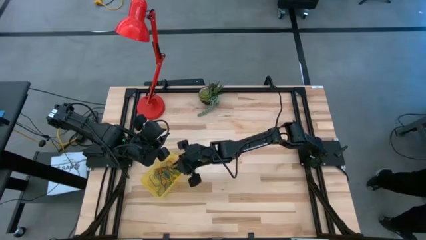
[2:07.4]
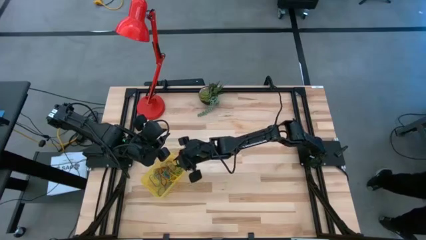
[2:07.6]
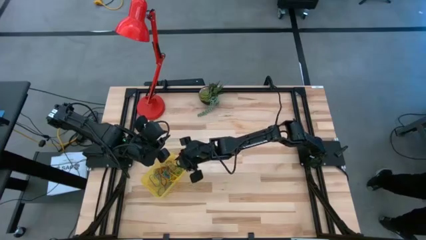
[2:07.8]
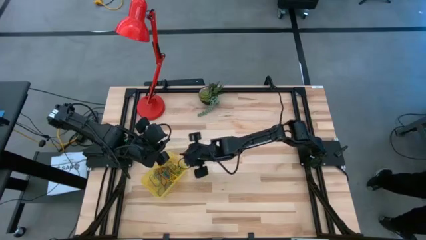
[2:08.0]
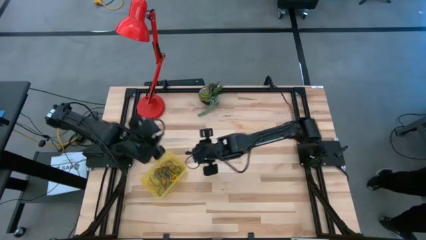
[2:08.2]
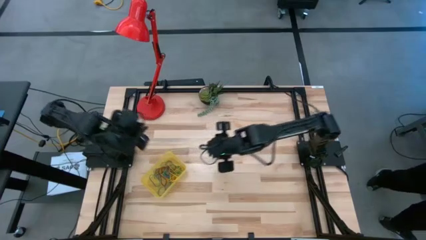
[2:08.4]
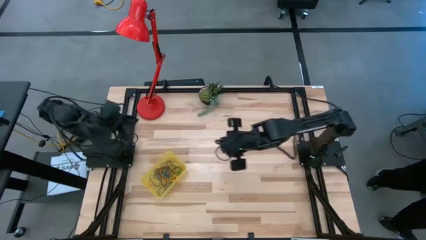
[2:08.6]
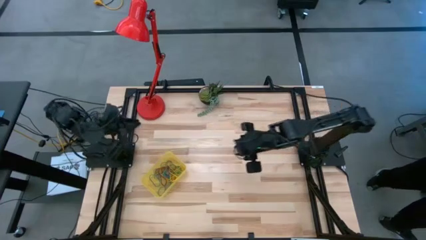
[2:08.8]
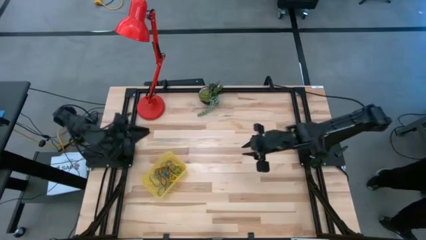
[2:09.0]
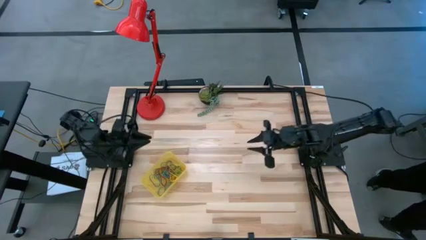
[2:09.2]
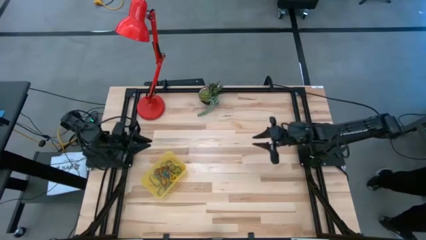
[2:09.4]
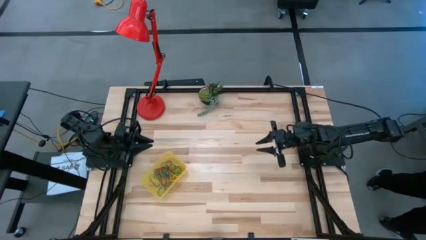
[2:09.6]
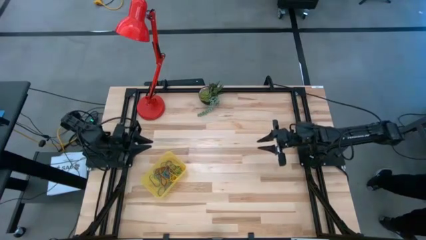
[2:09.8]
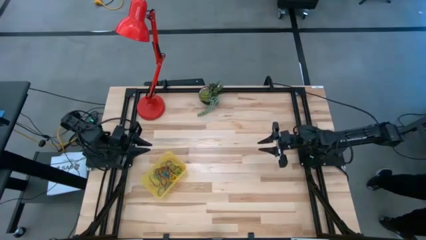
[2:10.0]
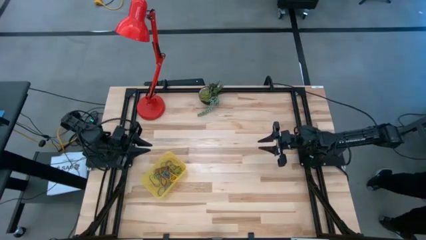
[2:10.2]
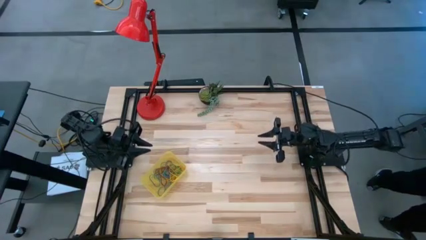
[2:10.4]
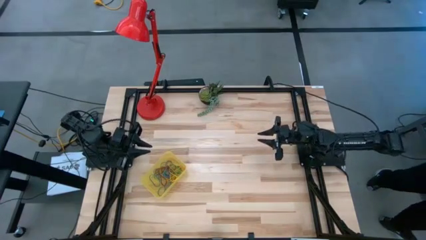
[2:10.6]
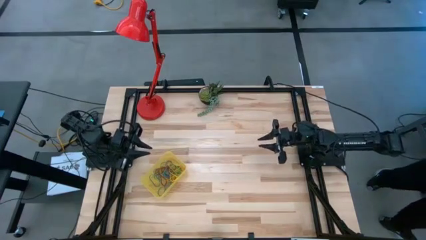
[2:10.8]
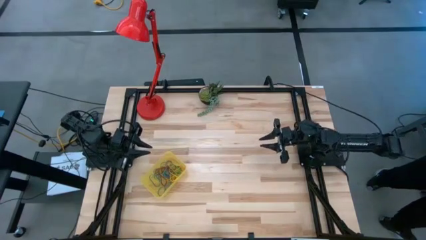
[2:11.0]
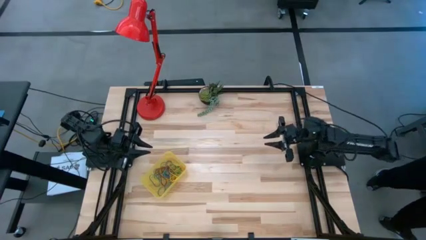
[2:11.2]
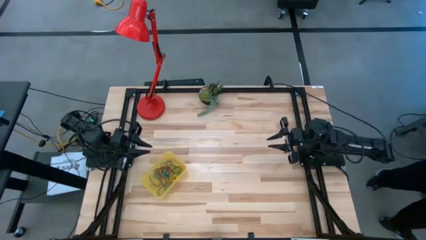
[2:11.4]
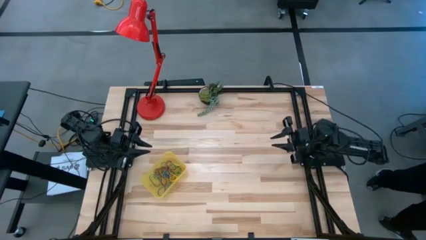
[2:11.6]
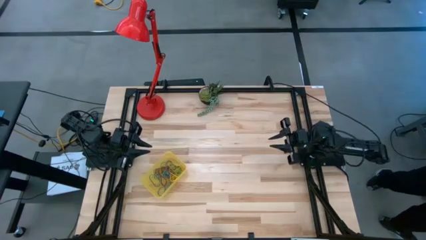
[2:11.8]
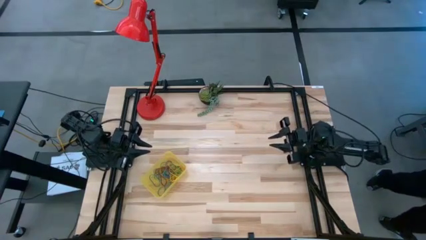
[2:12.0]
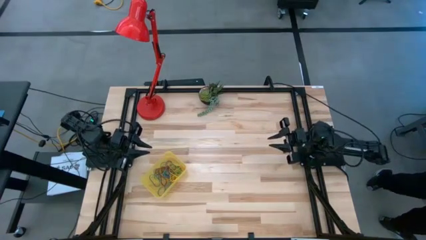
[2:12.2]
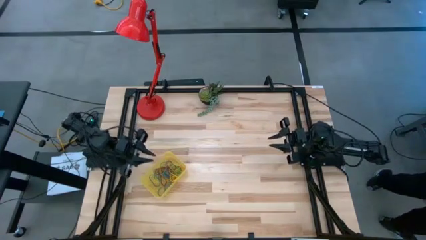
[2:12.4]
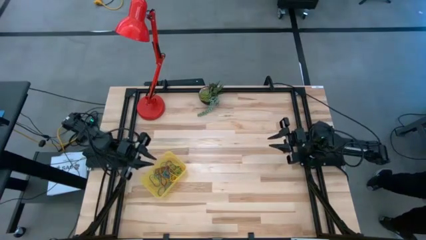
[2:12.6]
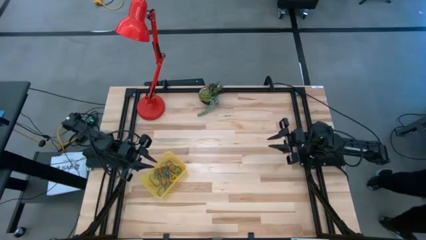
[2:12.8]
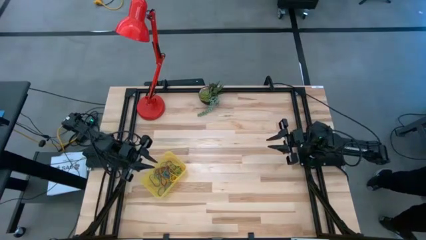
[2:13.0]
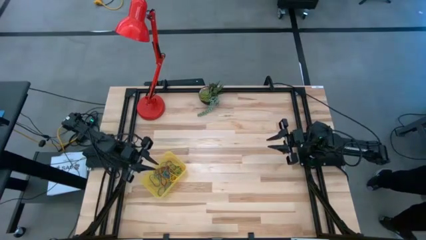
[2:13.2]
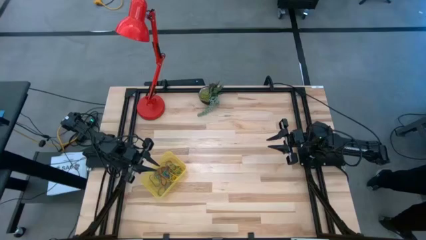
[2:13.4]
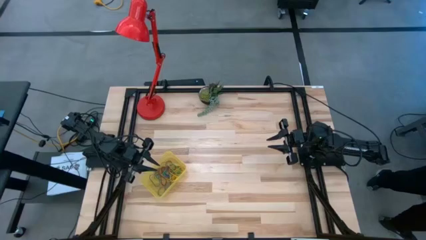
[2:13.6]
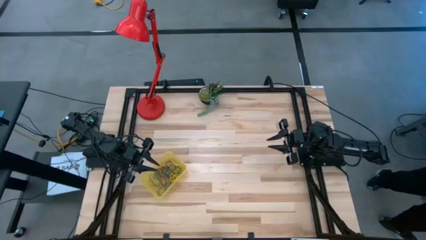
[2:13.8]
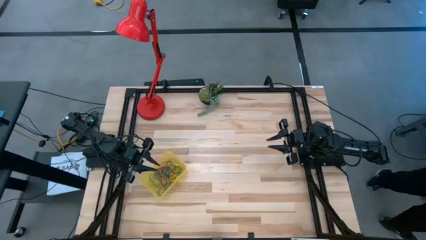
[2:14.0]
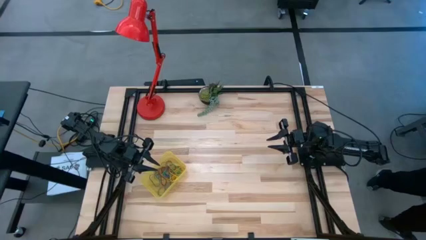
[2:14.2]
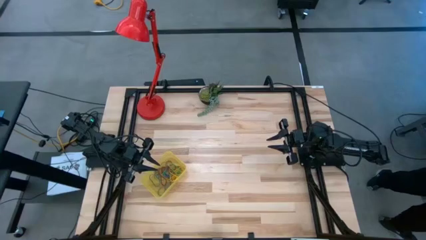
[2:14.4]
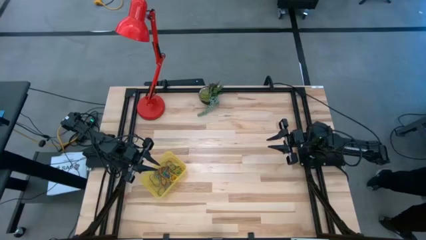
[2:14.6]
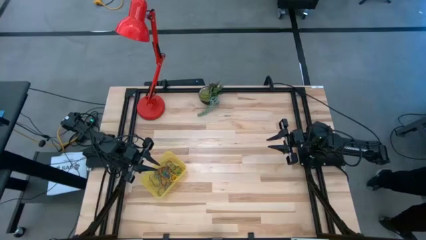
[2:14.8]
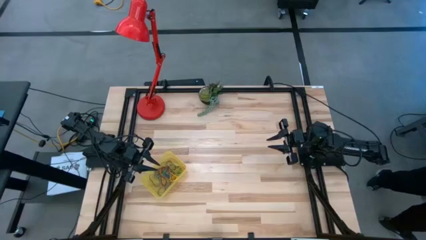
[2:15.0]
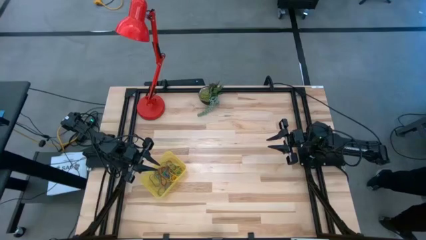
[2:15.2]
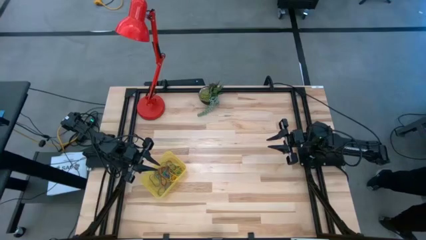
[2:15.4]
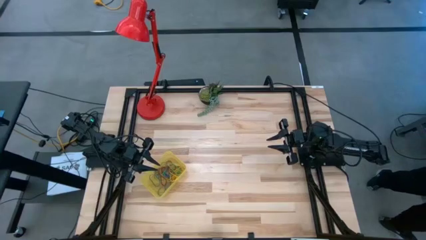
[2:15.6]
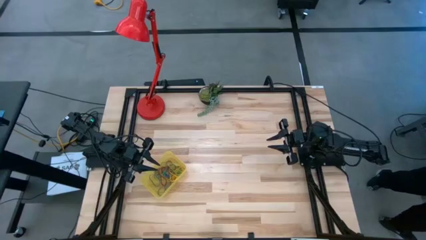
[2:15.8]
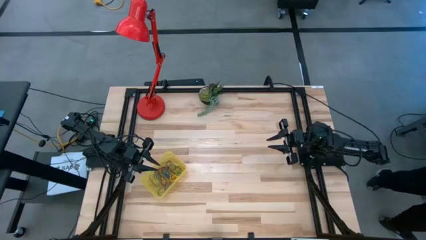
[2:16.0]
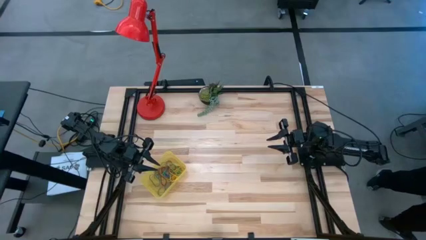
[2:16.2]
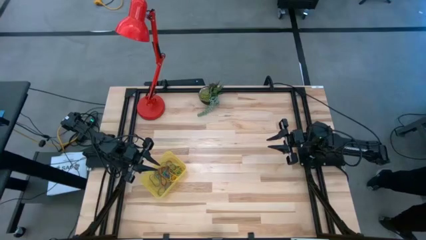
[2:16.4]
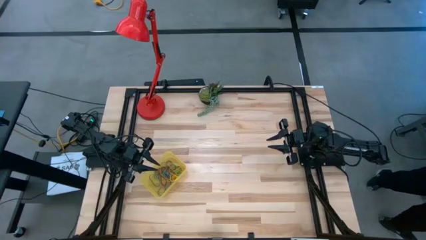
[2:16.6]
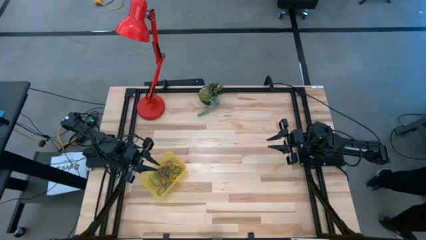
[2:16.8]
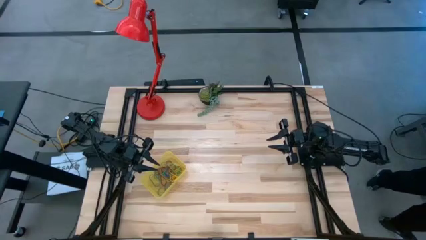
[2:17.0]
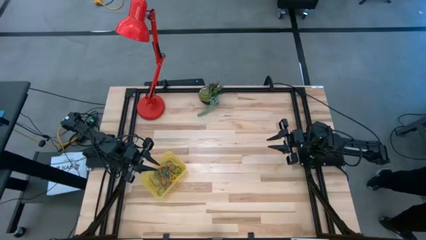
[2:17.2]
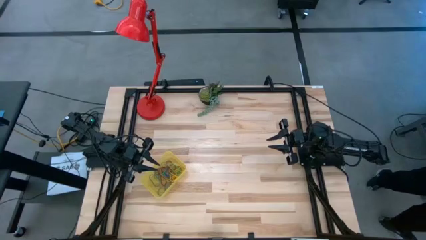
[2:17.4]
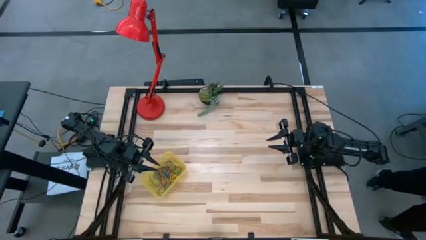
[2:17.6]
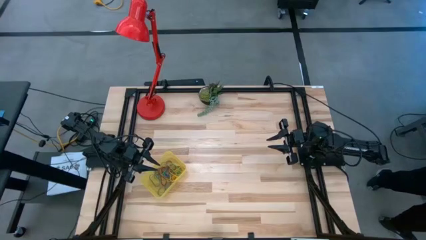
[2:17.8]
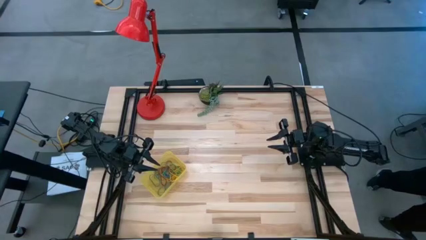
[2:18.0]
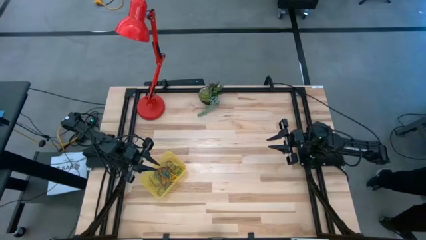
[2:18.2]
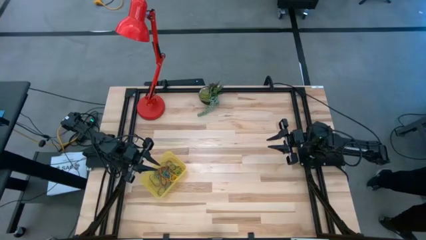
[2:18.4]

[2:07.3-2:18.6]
Task: Pick and place items into bin
Return to Home Position

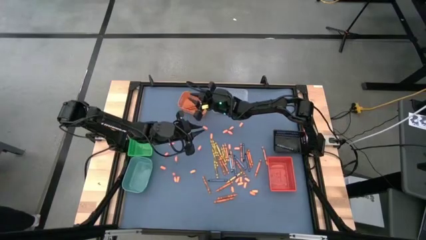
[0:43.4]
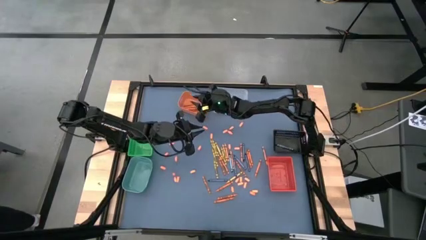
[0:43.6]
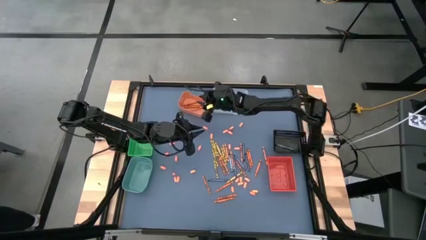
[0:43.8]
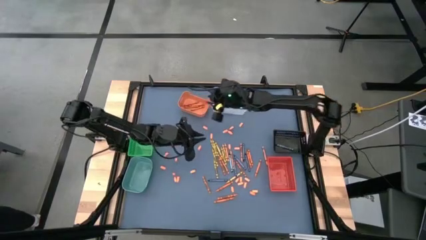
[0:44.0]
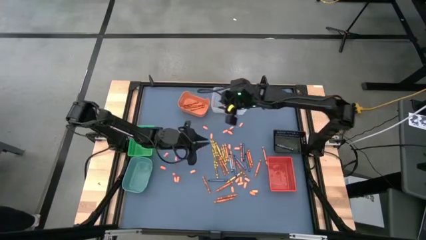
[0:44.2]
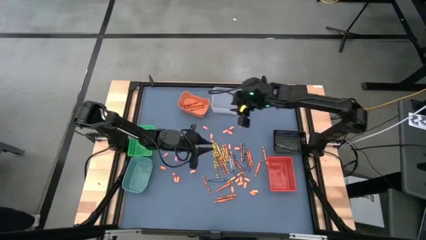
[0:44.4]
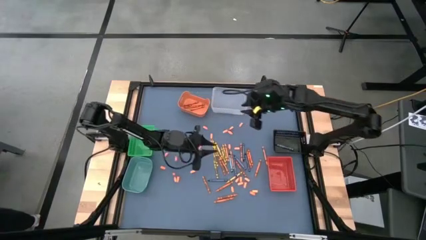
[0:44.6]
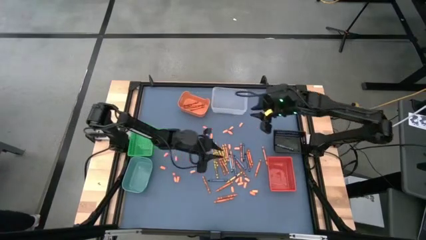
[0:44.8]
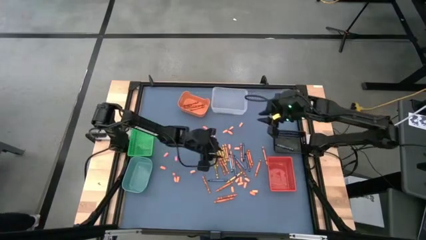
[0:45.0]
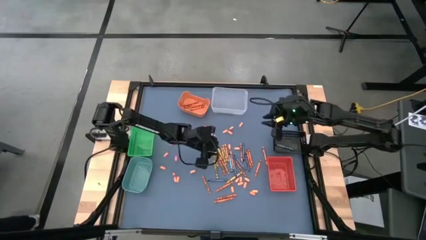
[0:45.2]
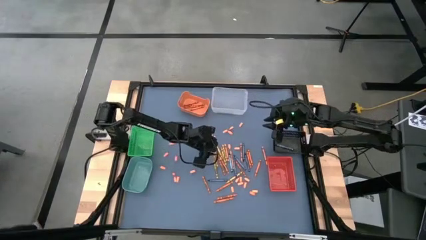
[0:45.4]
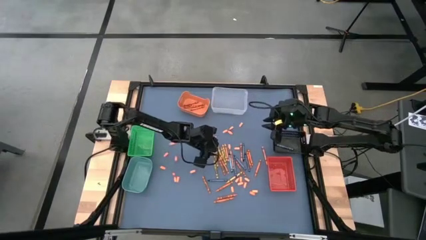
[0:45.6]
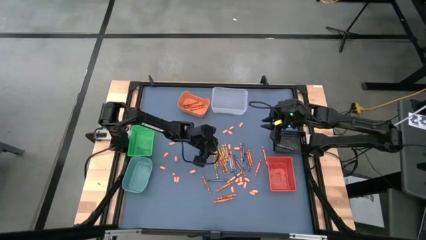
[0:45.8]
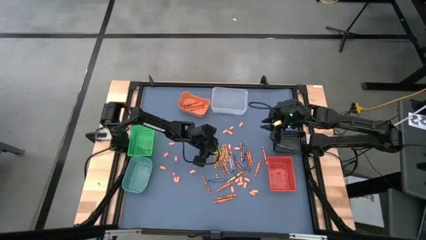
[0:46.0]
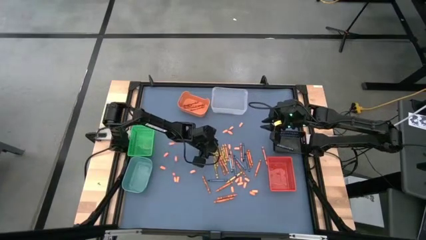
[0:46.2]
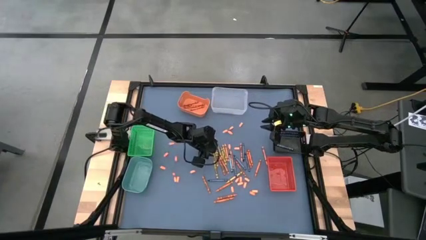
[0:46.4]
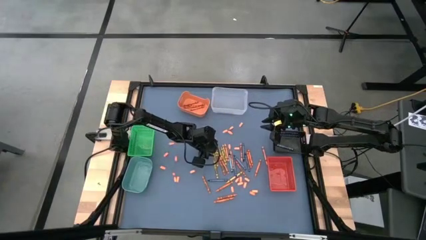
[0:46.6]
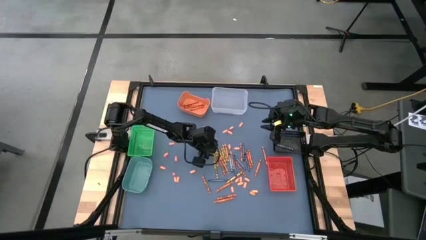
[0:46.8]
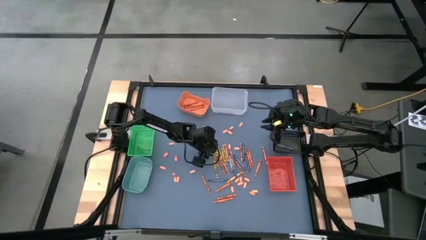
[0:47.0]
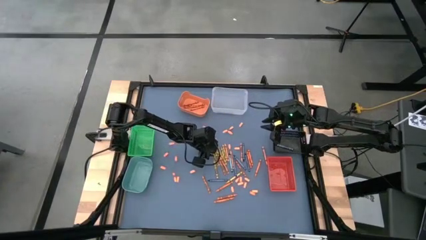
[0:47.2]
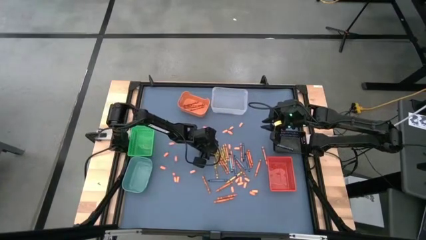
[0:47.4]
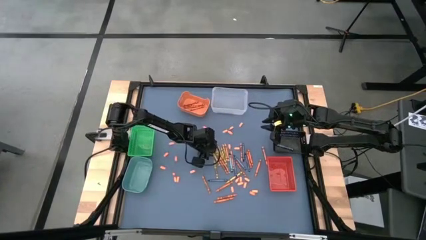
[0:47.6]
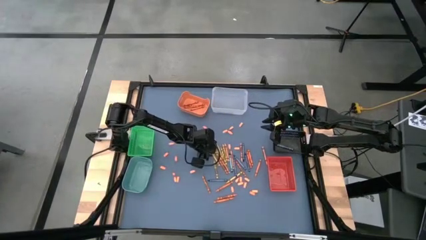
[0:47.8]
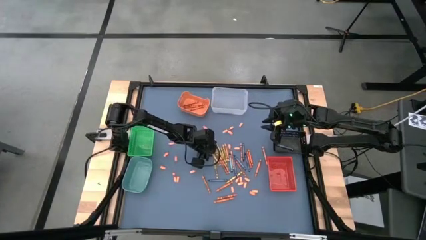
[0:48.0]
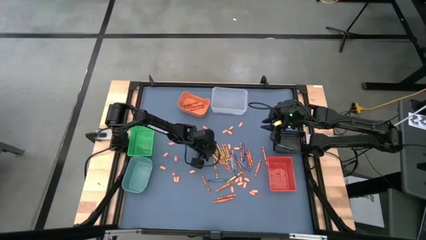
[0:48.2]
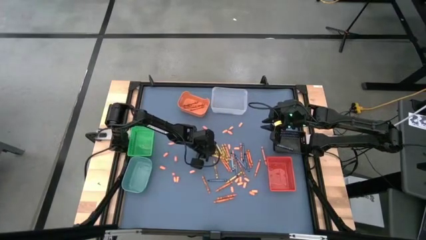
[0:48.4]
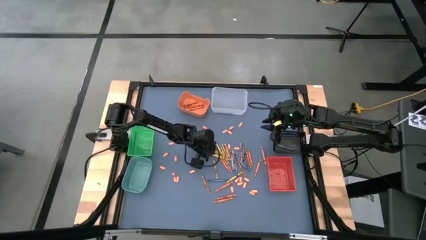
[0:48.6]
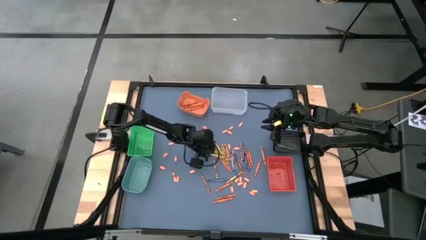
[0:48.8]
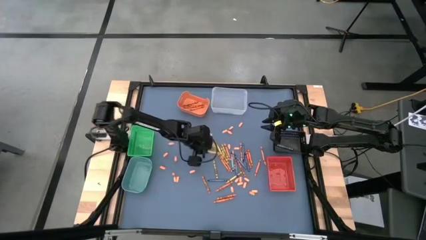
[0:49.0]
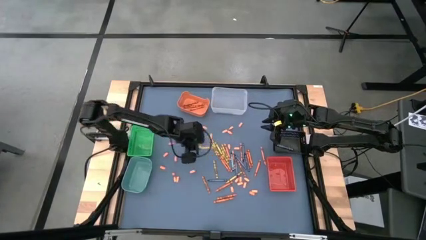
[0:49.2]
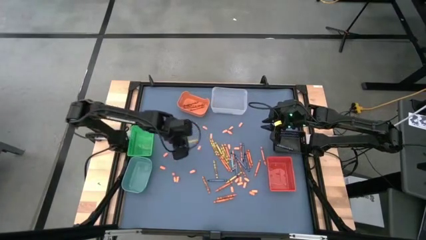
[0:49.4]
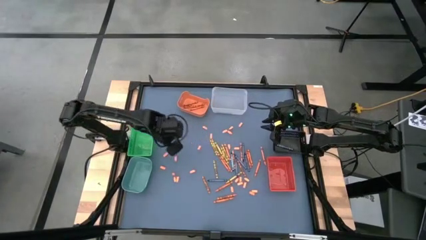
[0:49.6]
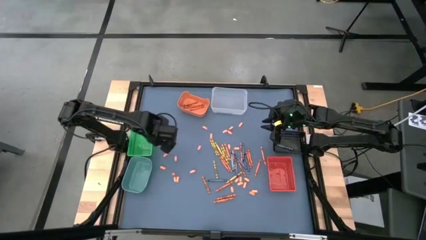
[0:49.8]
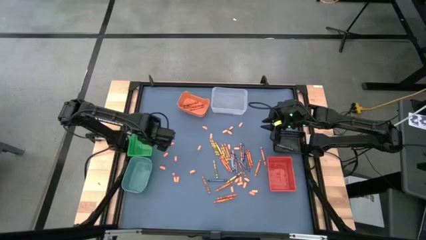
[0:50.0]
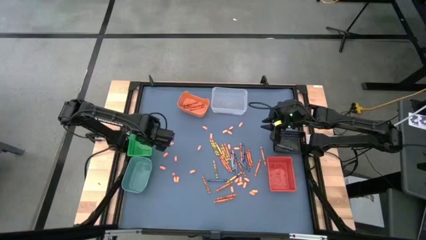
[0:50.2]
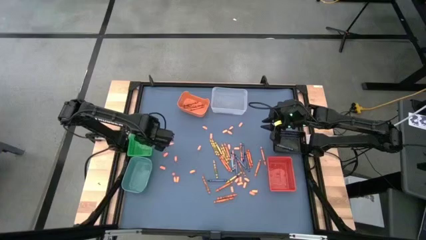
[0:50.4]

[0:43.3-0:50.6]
Task: Sort crayons
Put the yellow crayon into the green bin
